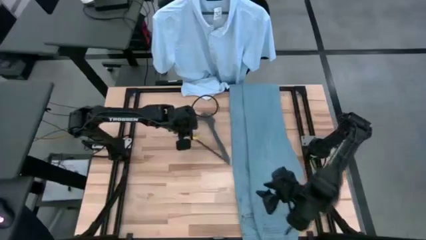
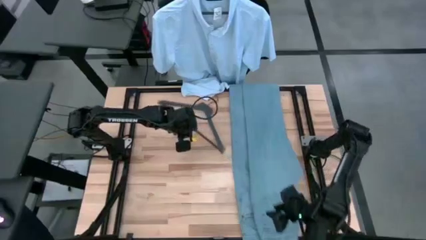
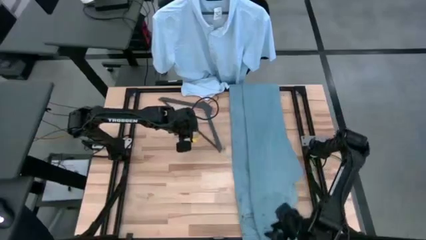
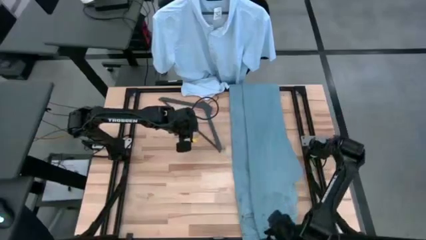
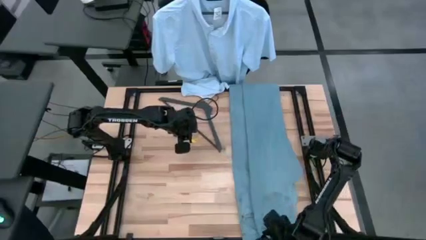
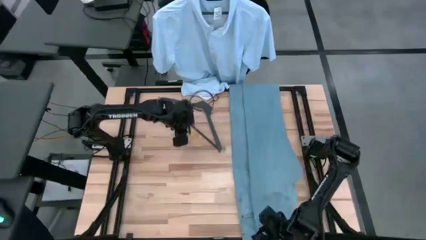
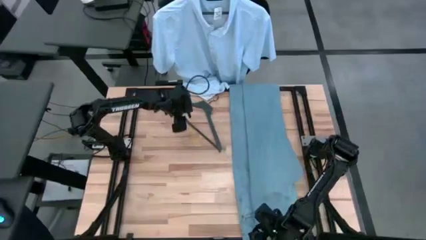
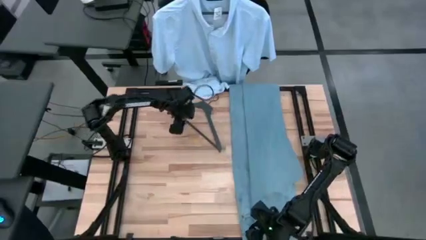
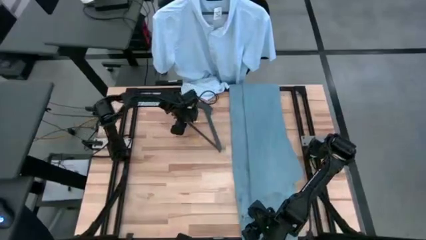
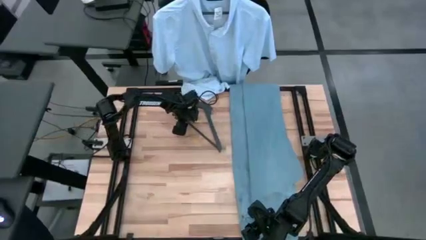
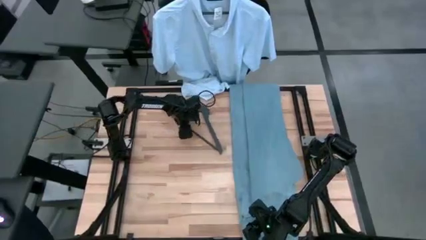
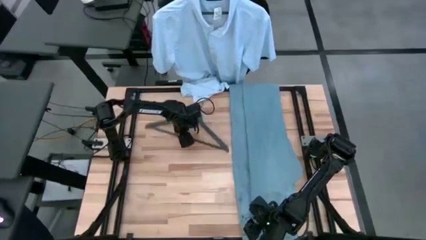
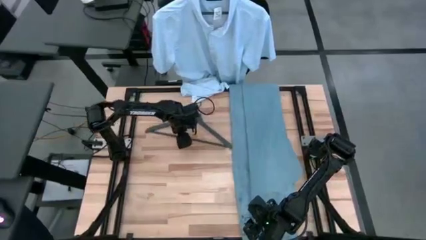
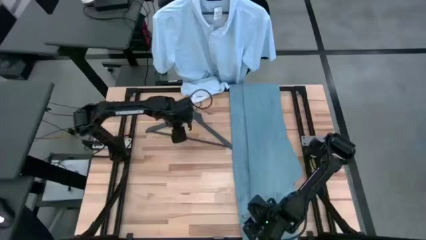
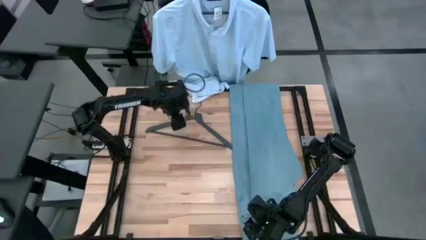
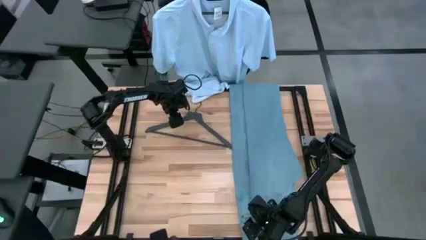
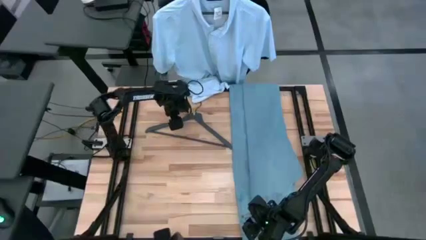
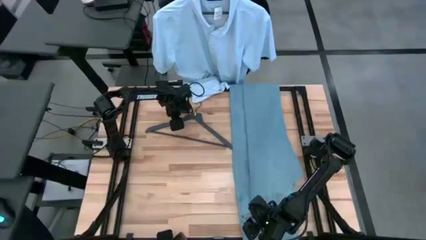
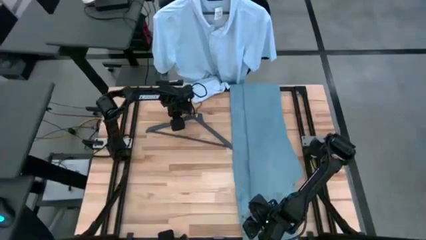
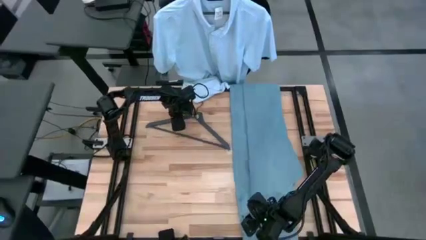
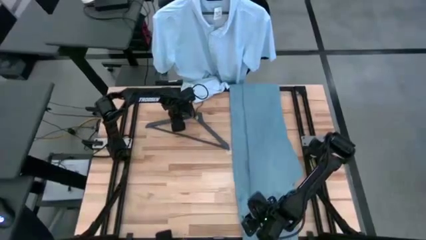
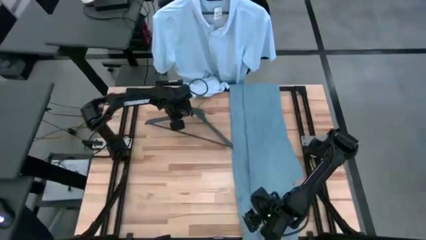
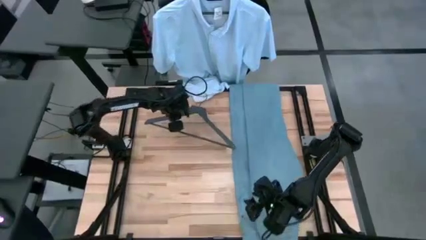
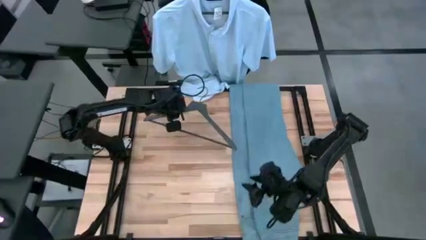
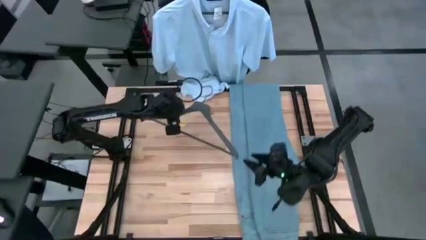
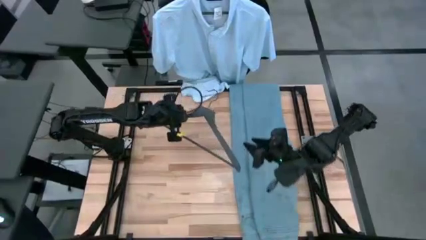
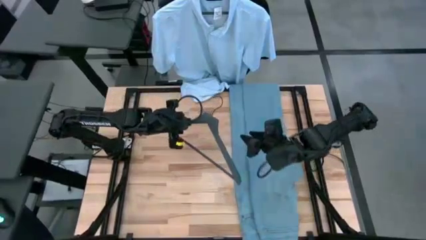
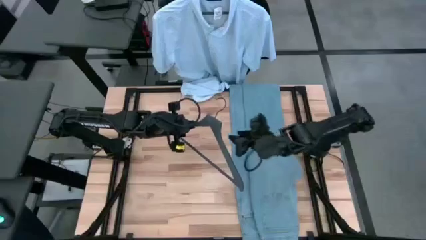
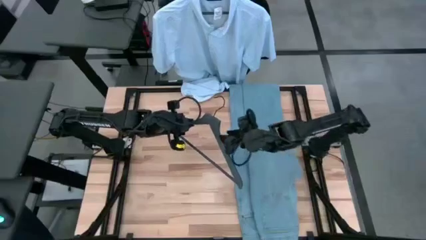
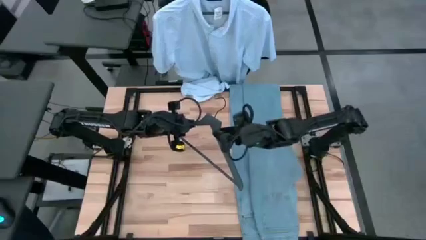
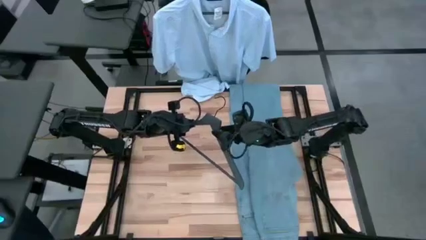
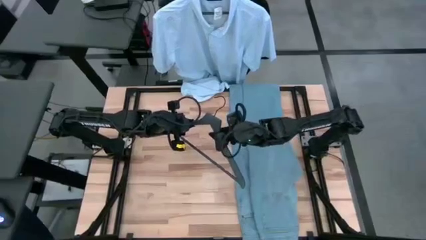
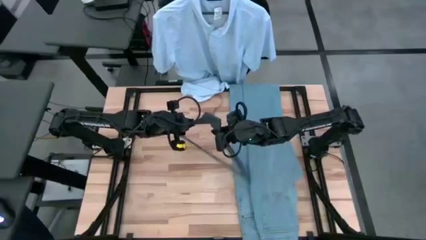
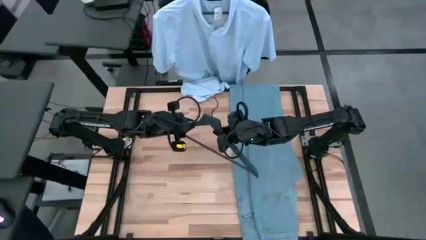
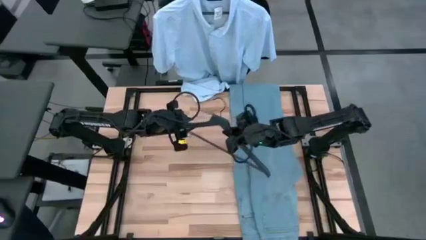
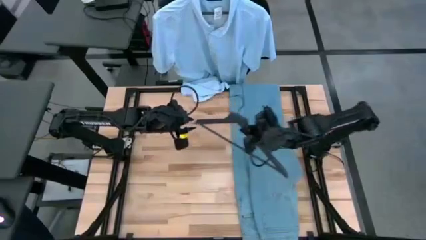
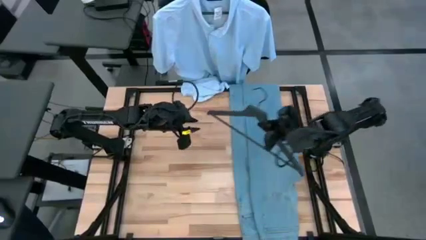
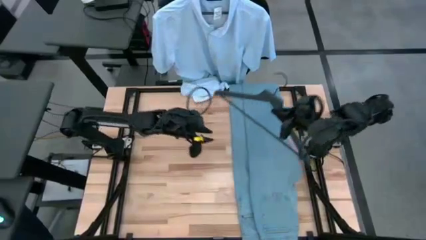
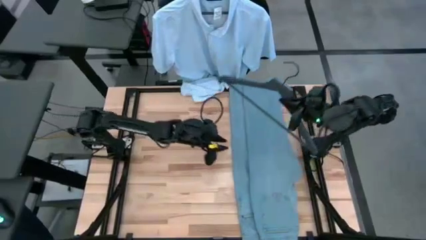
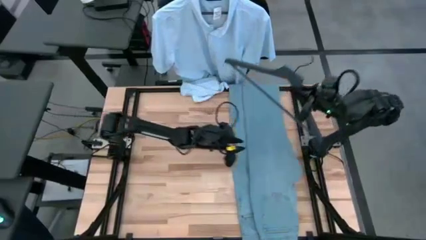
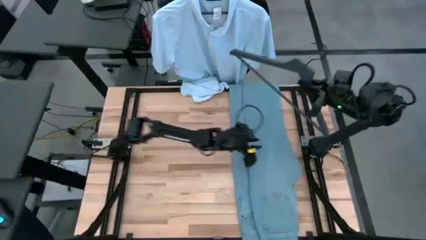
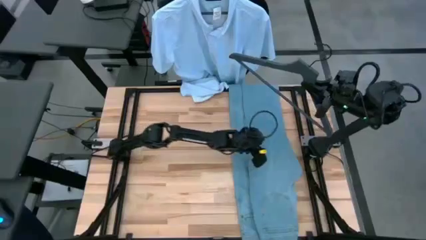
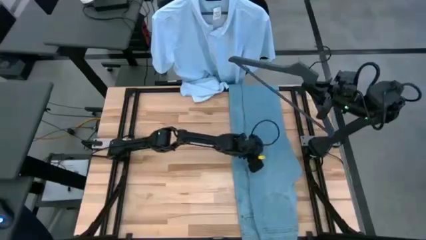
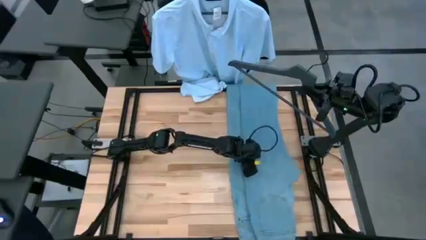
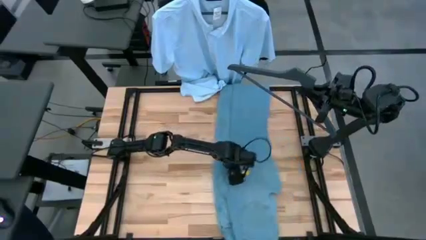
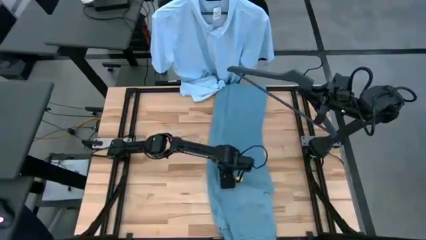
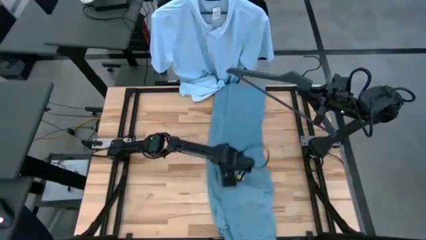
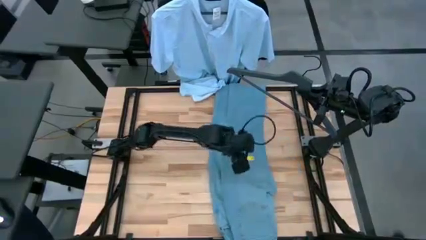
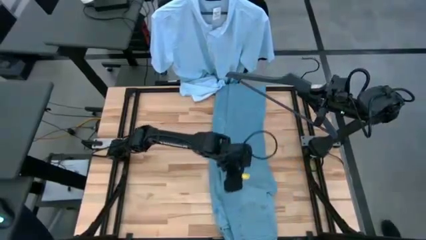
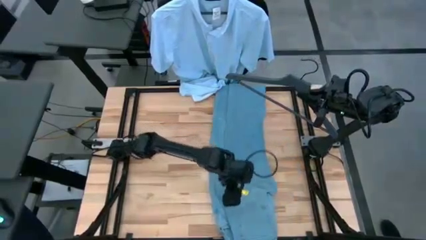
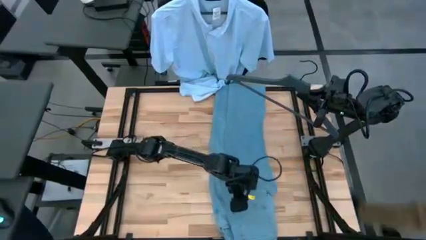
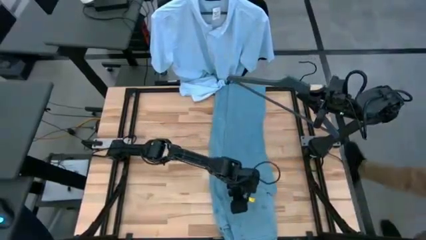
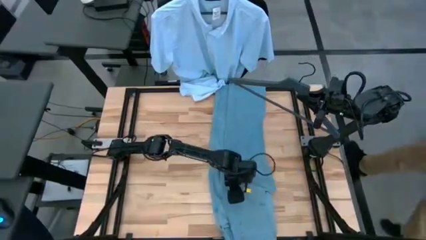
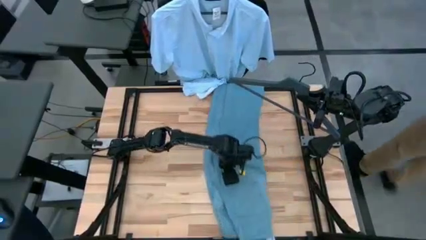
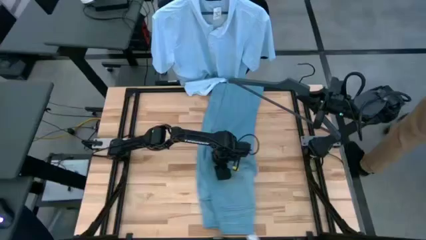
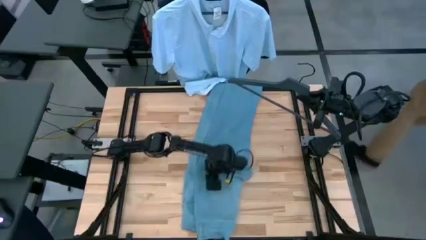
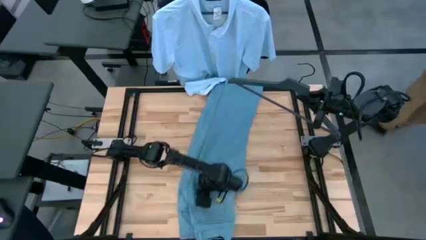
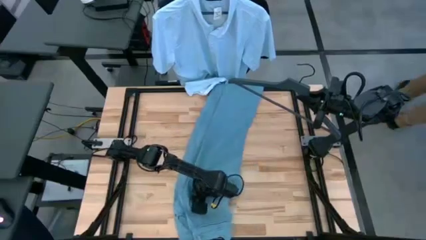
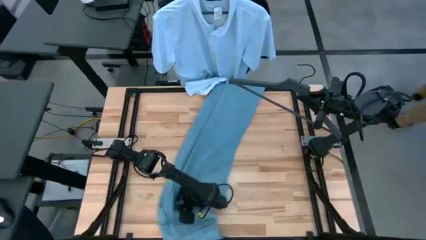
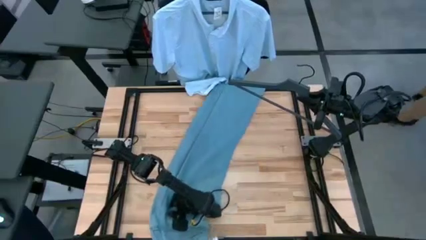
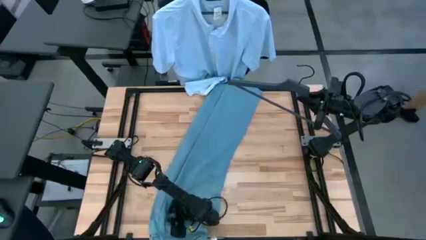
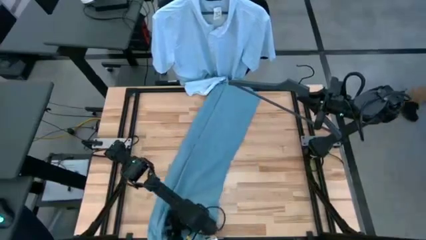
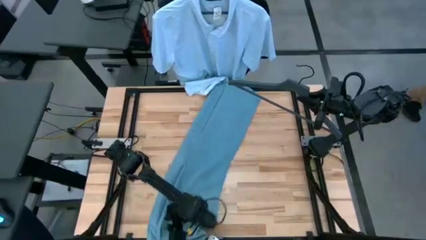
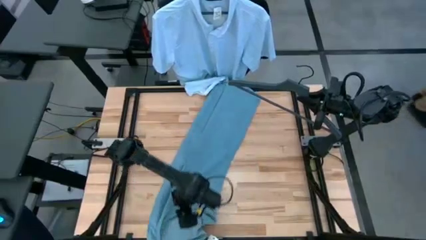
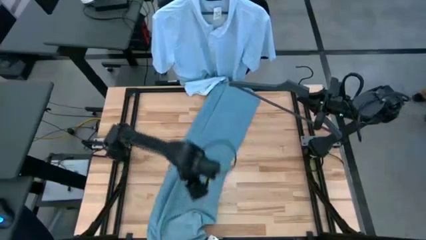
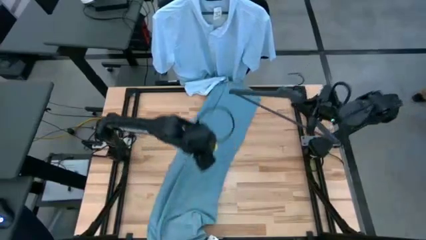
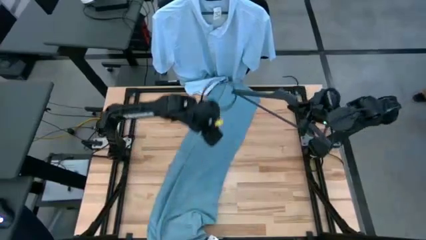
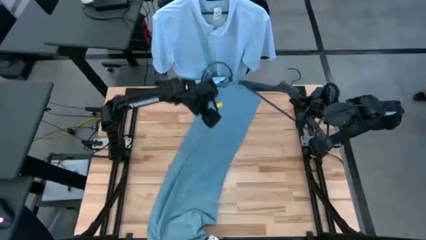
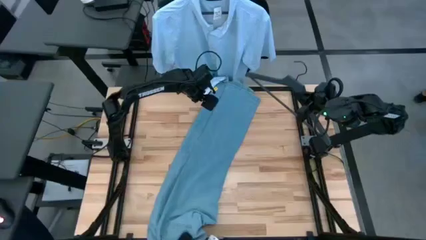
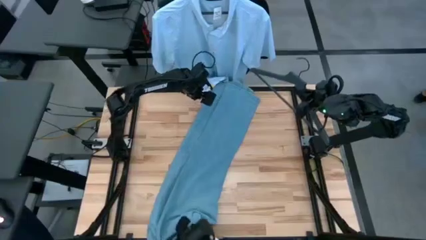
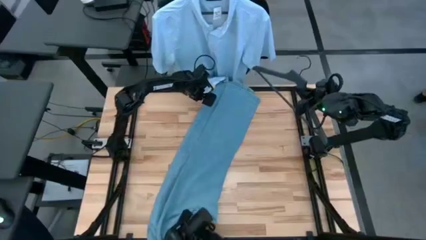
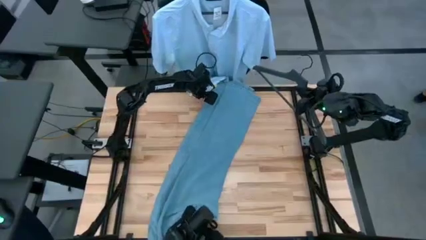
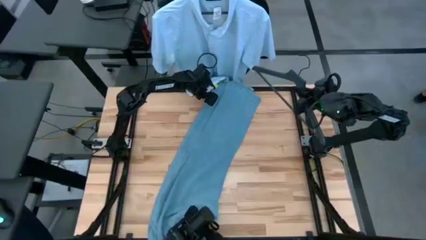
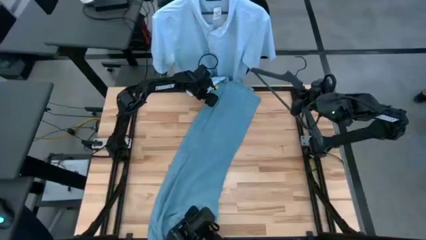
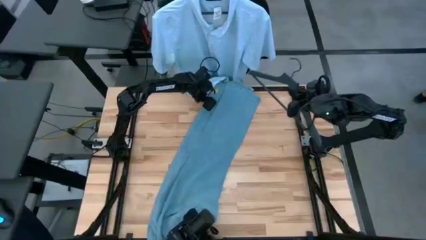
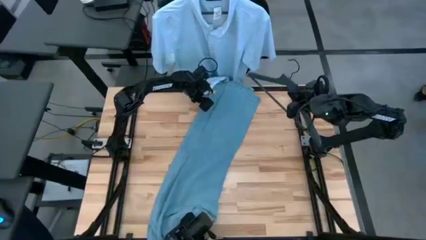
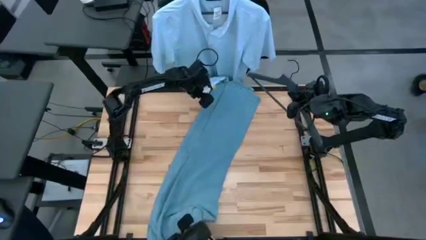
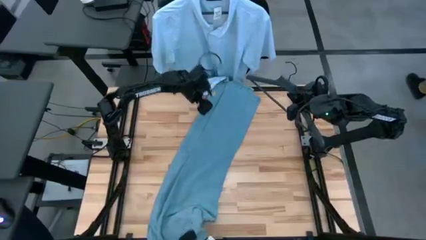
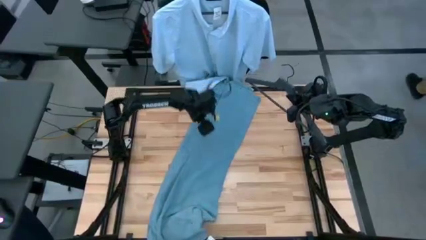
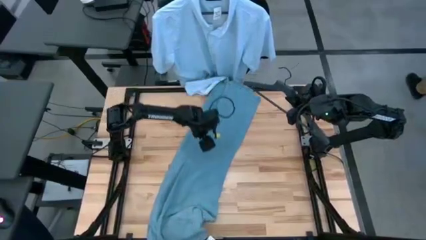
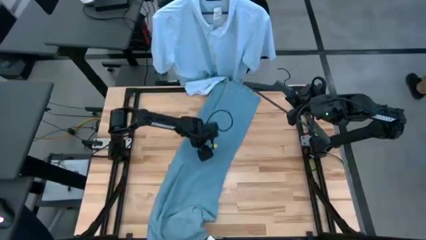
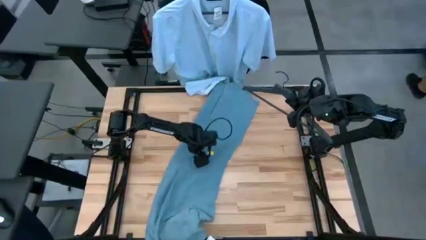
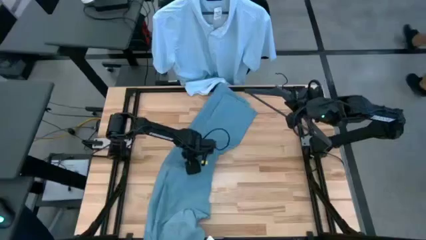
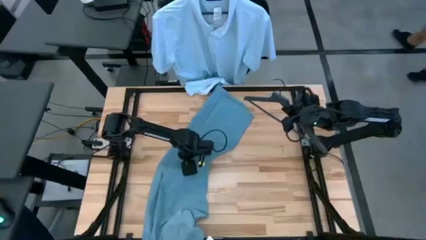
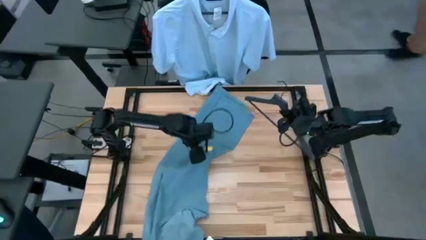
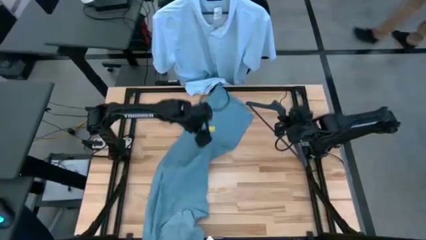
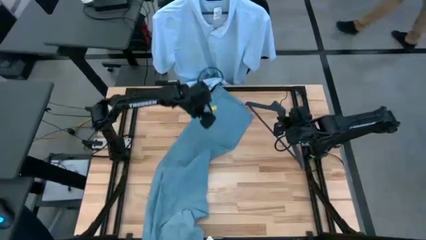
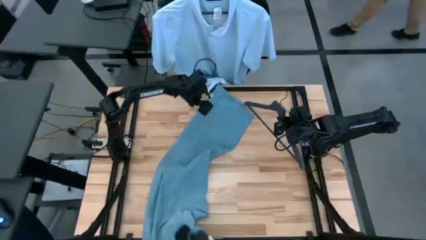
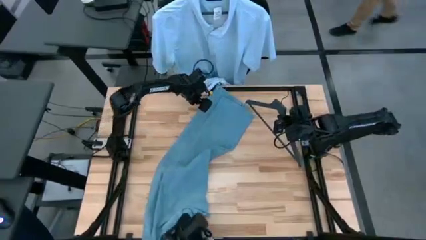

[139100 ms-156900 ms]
Task: Hang clothes
Insert the blue jeans on the grey hanger
